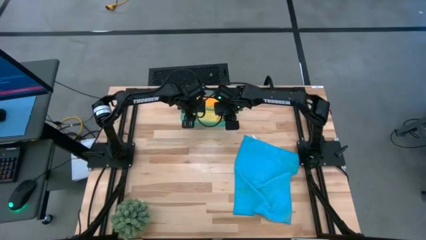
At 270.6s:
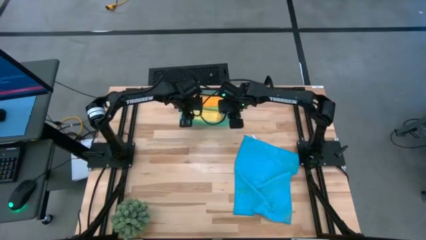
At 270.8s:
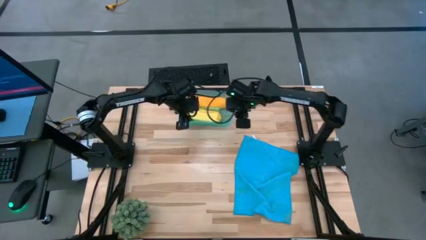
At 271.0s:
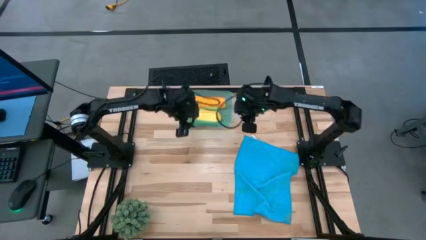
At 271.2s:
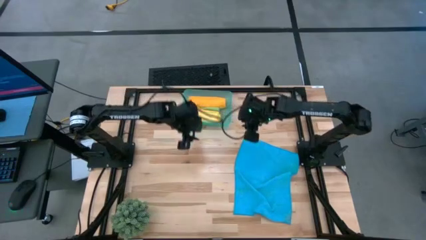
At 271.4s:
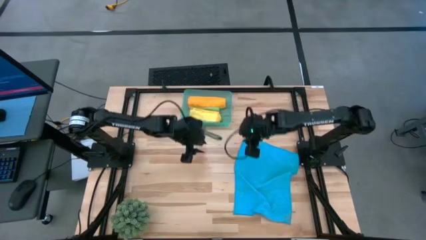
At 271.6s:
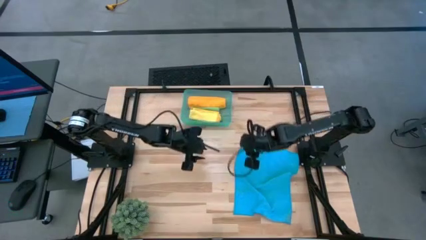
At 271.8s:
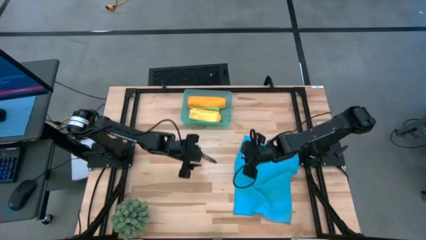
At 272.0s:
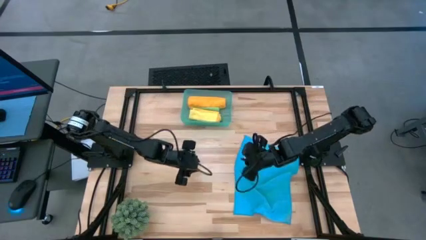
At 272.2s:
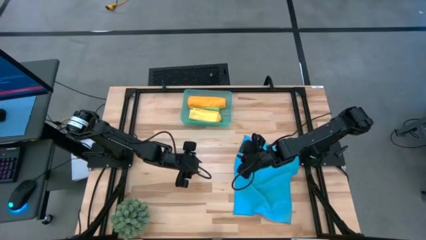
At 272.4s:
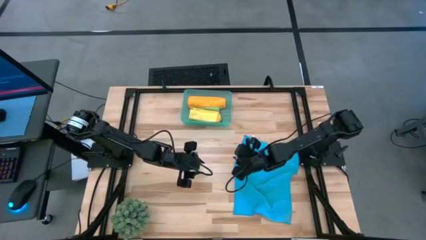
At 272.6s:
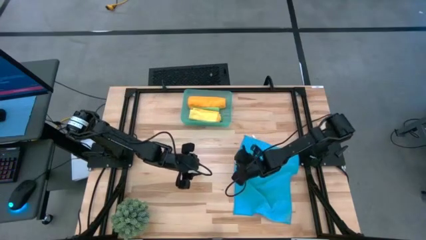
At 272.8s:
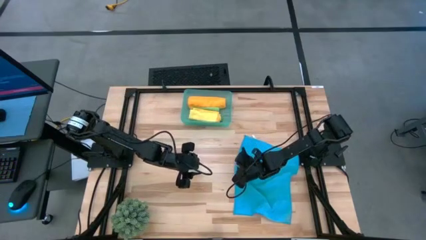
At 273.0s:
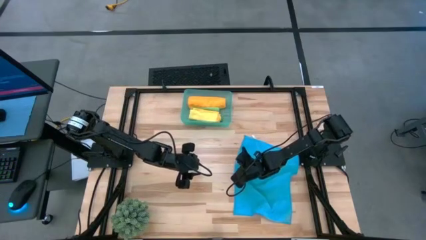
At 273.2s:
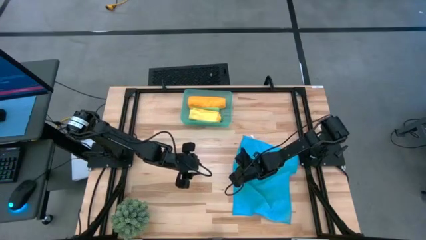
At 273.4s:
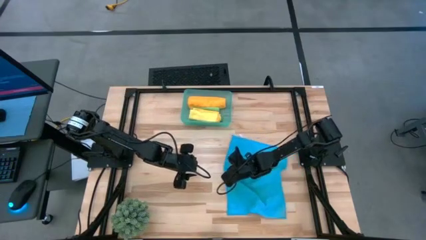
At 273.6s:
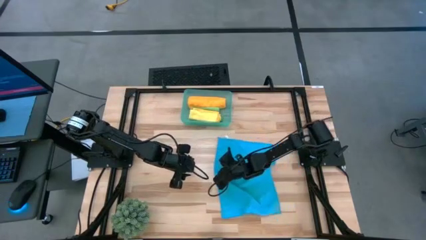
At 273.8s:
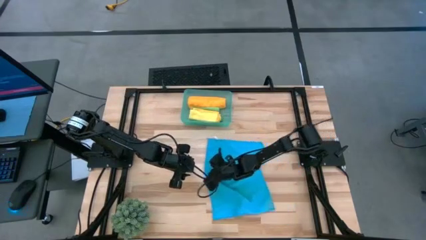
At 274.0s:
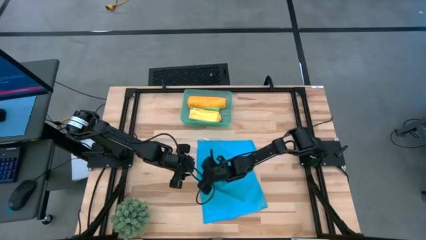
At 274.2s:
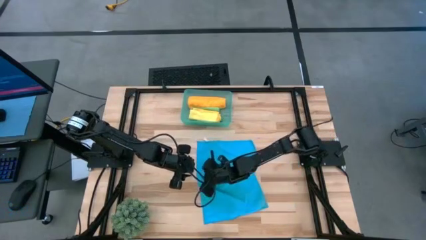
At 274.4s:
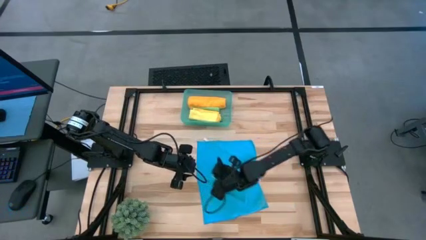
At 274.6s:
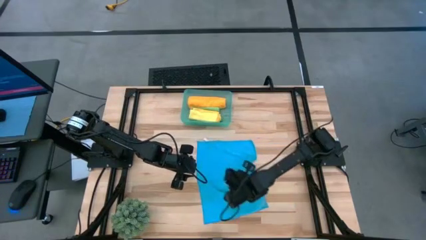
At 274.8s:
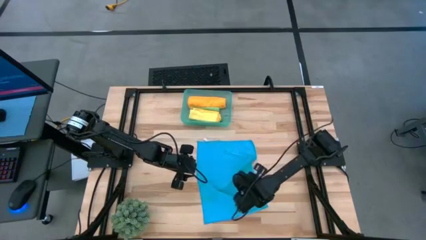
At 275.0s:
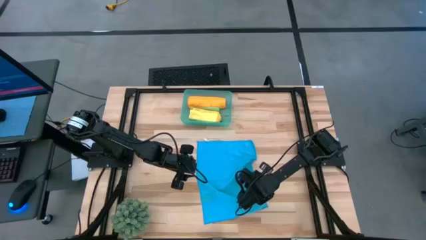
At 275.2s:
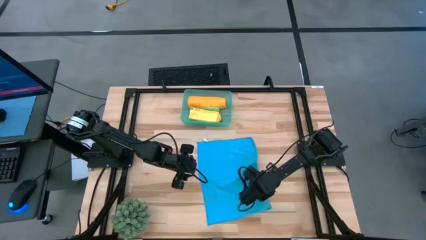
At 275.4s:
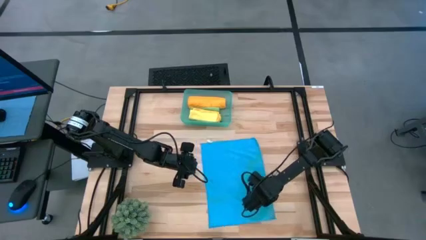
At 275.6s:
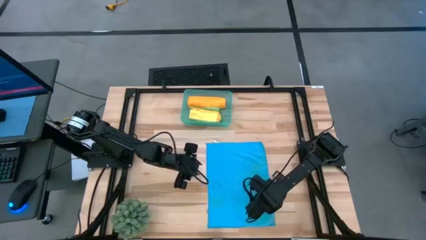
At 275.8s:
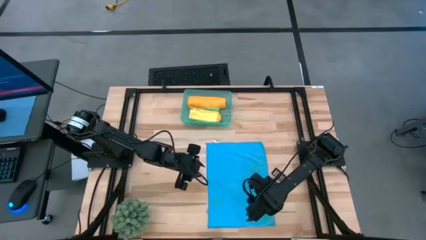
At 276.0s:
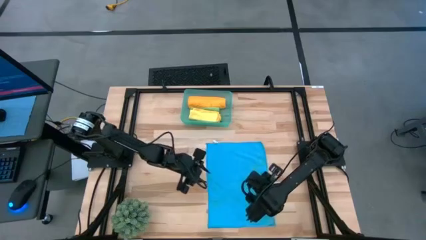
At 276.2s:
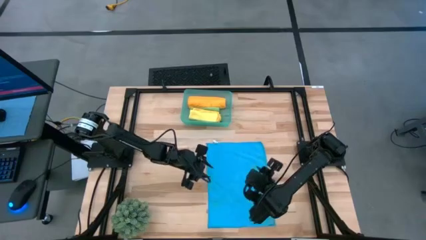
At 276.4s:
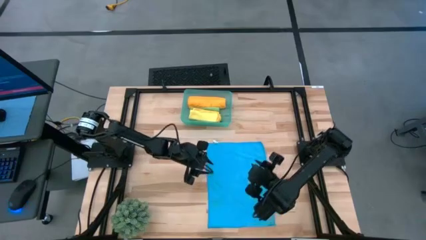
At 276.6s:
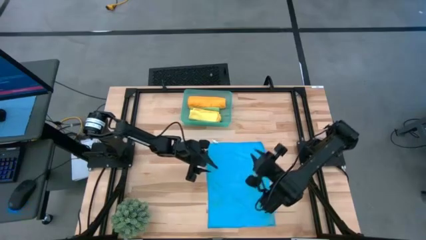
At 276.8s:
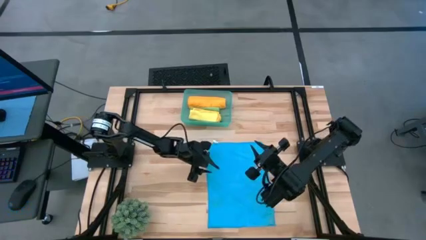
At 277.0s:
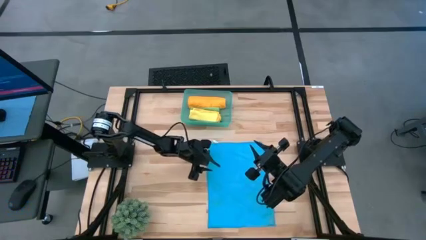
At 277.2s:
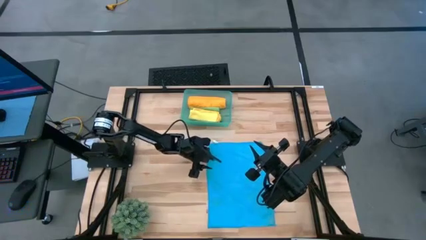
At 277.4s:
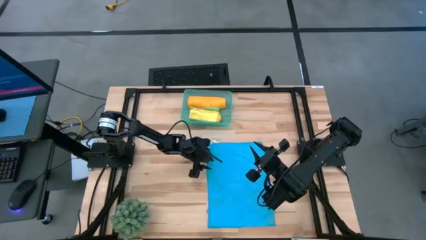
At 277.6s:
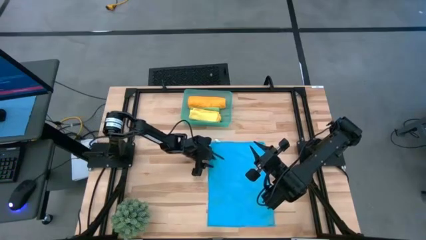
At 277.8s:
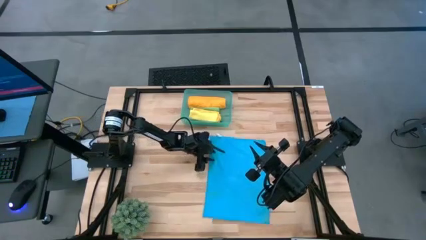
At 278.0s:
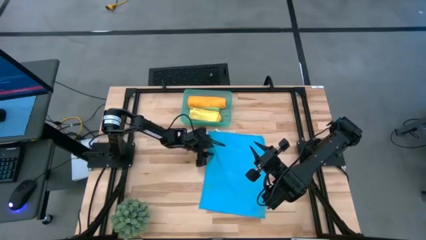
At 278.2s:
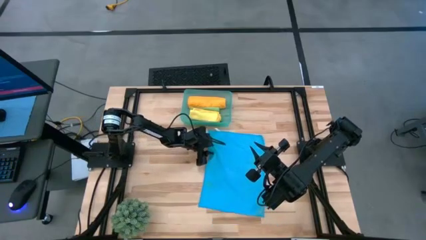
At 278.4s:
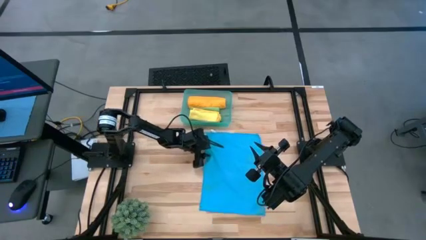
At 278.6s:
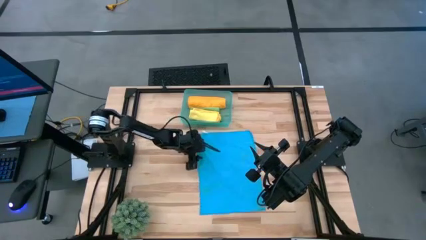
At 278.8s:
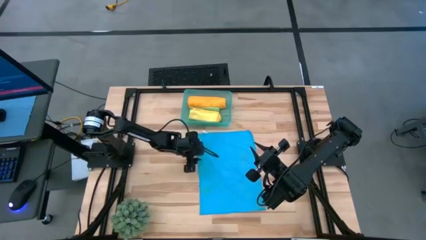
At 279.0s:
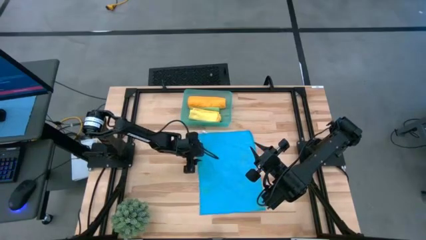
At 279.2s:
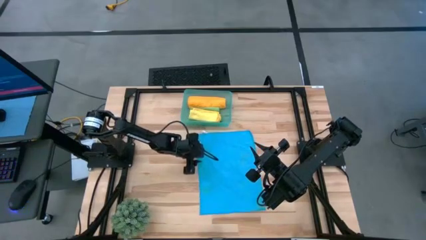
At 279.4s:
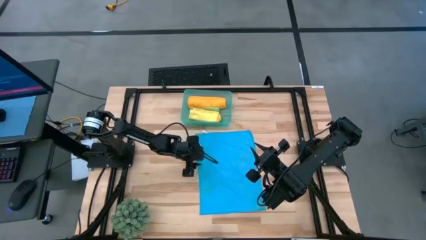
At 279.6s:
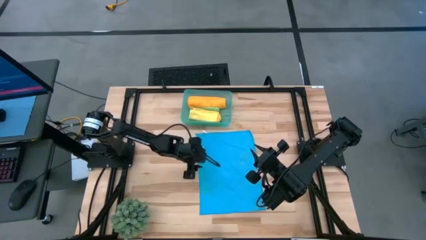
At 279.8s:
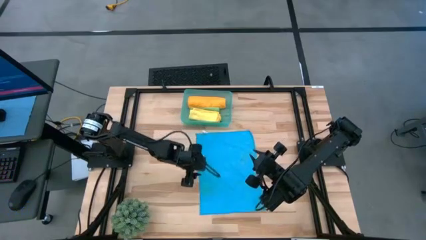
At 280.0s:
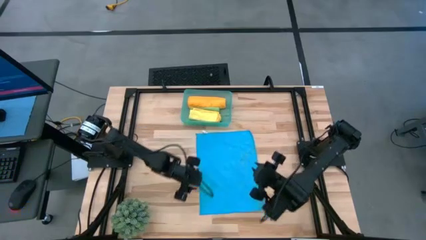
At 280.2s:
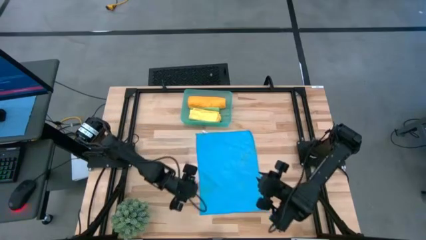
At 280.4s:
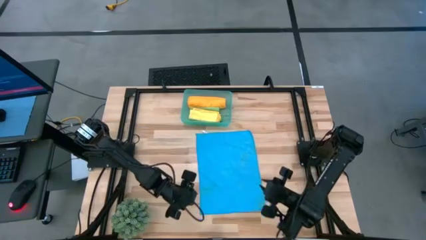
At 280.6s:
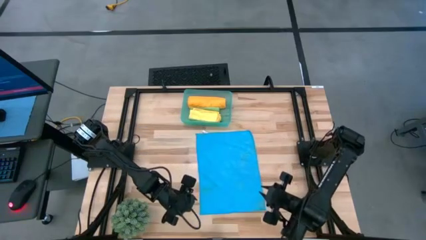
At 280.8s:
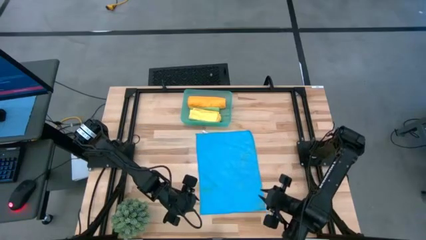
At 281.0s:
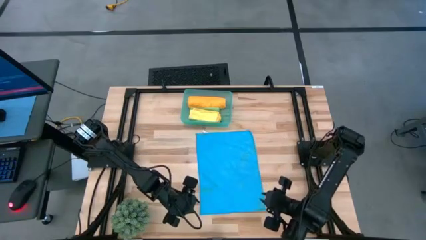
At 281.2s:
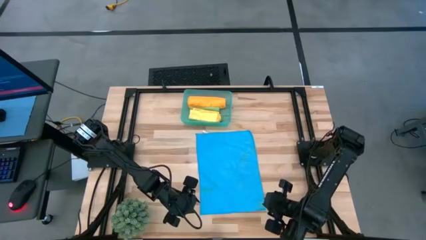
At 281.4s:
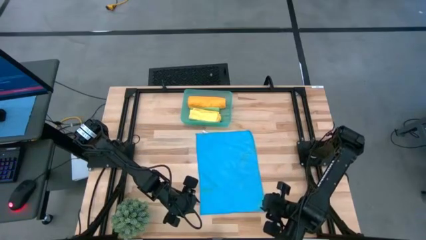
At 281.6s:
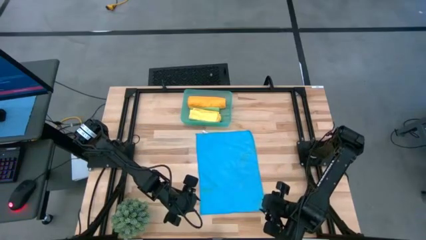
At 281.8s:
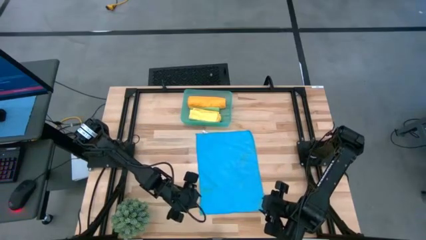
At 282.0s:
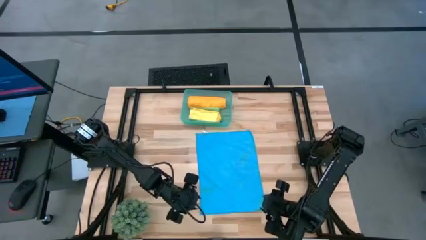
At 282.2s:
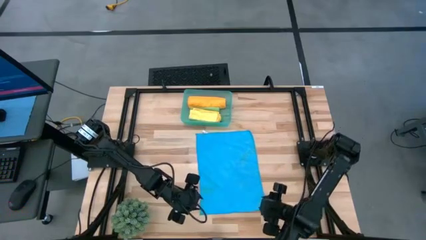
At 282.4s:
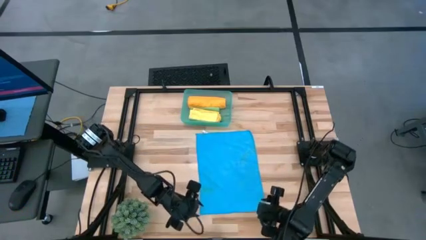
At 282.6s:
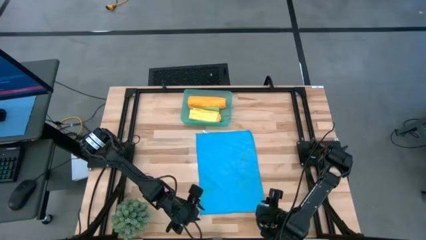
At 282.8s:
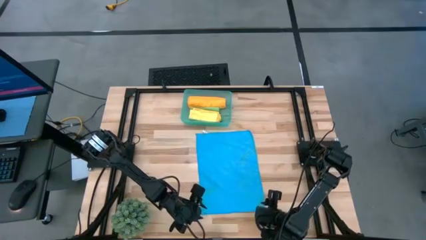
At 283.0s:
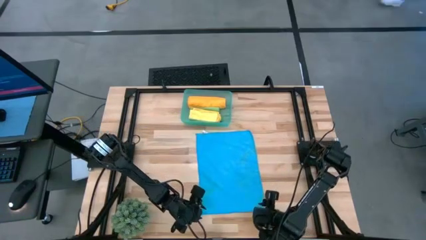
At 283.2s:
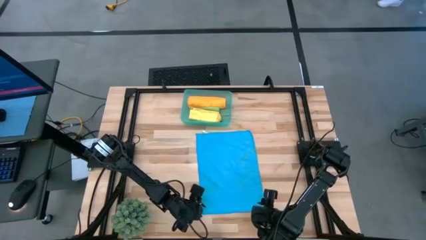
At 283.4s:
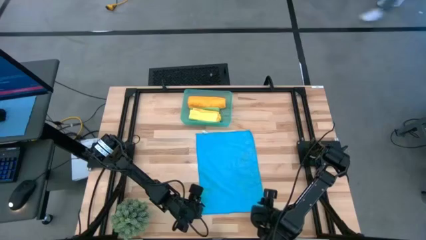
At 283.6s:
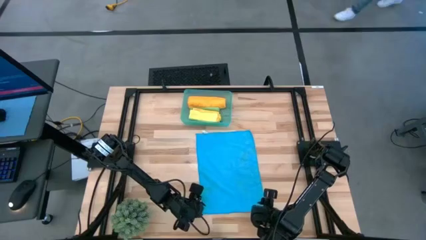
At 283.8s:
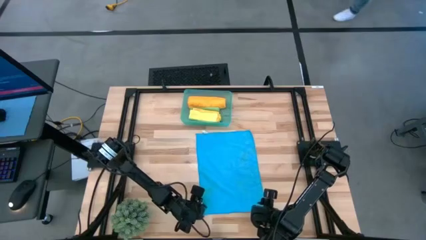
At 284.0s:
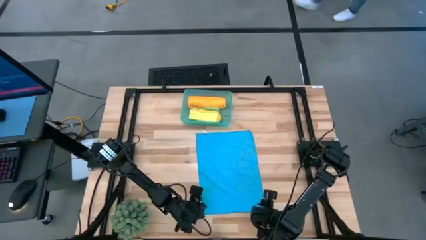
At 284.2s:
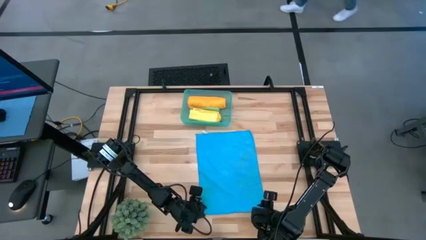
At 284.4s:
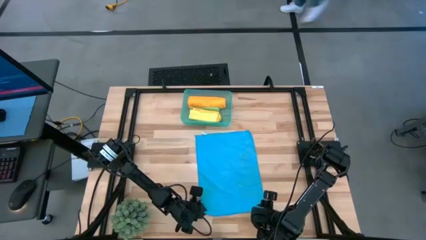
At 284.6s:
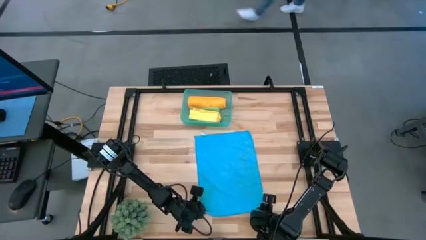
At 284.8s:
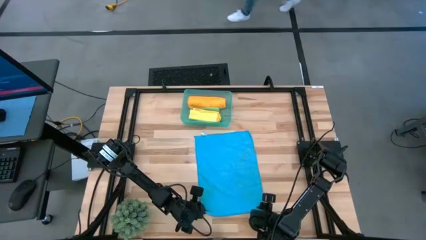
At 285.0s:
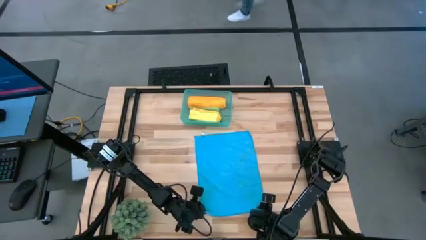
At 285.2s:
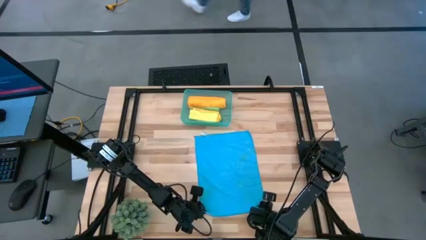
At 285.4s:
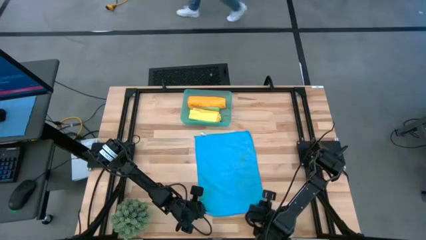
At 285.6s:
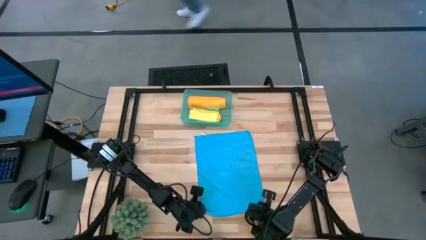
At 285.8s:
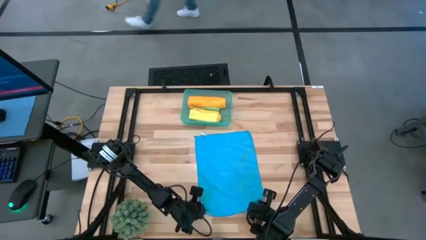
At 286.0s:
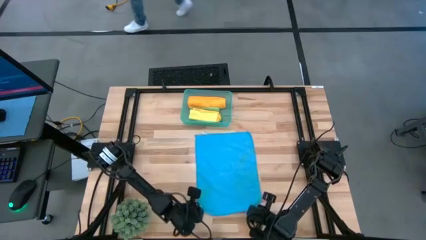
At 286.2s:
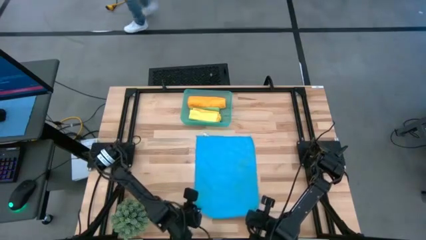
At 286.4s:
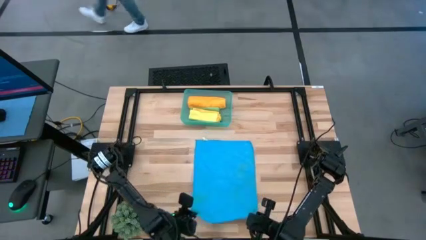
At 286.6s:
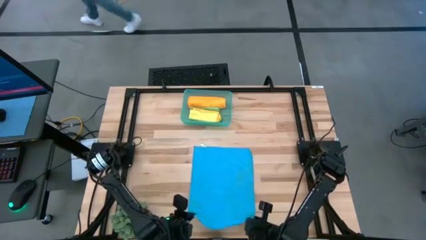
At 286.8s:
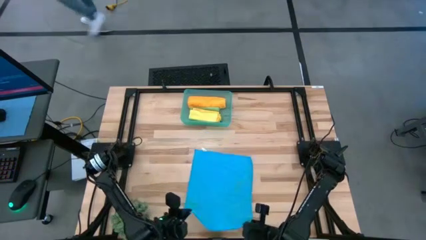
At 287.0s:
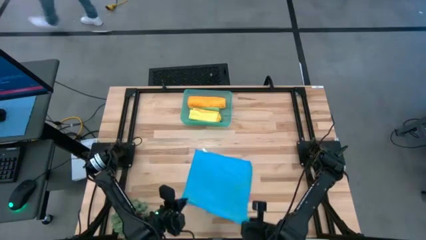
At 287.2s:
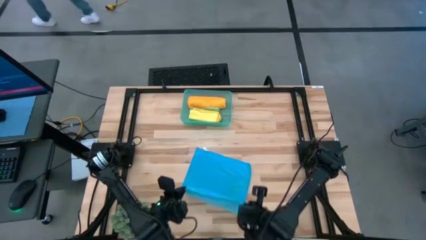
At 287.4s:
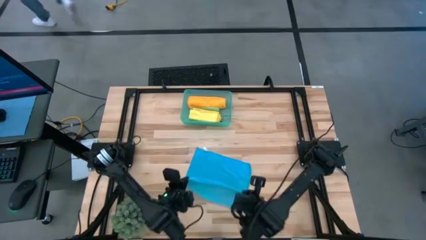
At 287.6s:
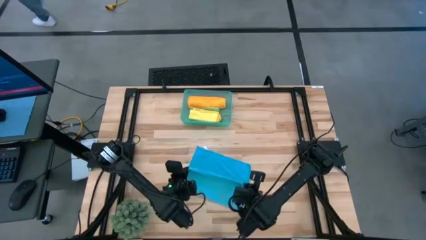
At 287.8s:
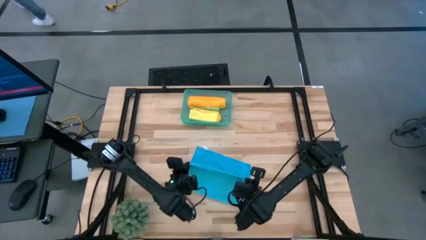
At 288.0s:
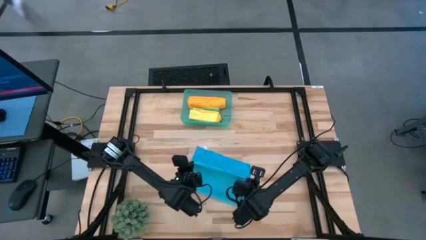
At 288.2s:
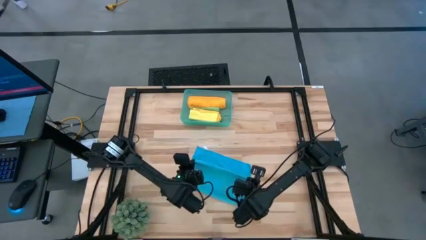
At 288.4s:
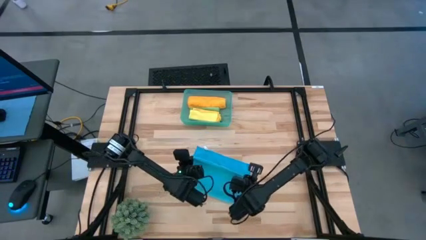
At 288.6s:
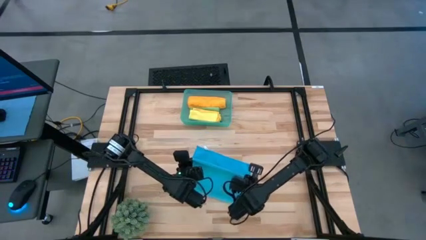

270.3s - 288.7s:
Task: Roll microfiber towels into tight, uniform cylinder then place into a basket
Fold the blue towel
